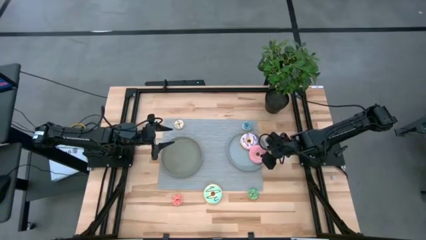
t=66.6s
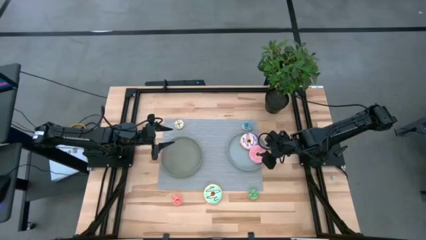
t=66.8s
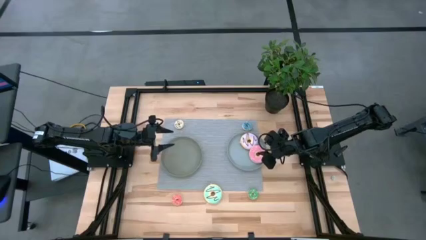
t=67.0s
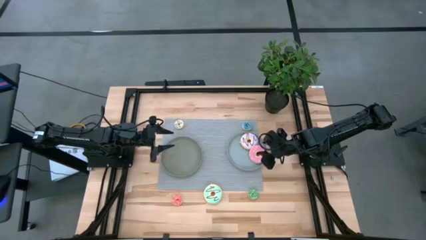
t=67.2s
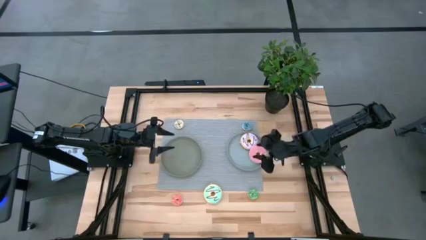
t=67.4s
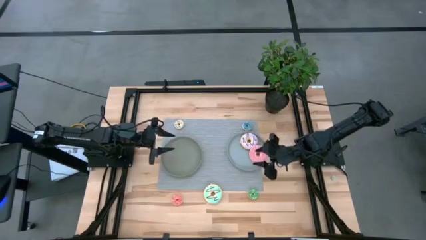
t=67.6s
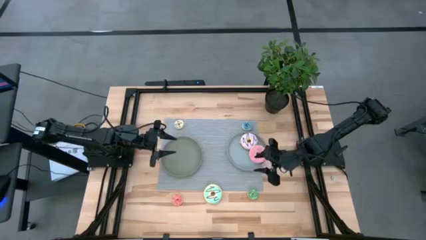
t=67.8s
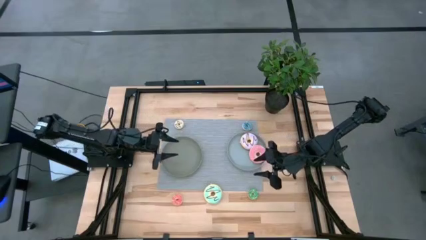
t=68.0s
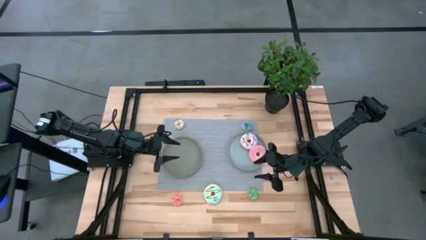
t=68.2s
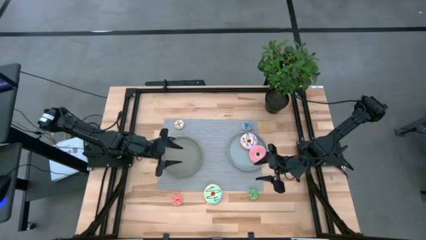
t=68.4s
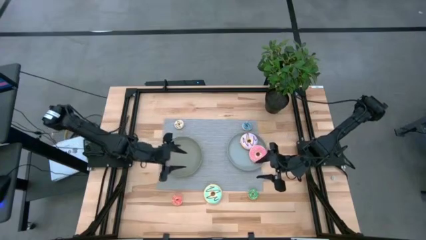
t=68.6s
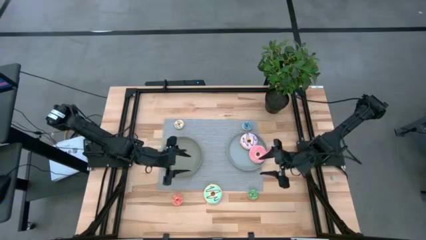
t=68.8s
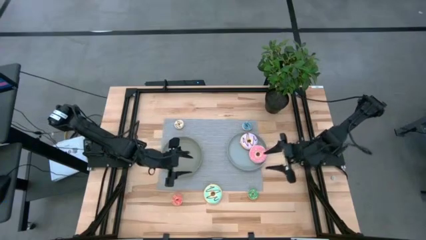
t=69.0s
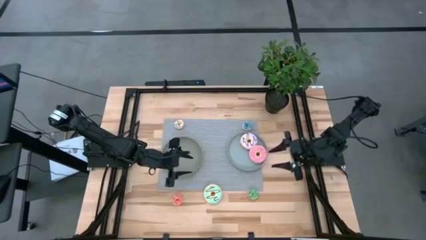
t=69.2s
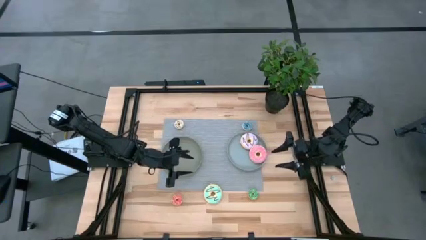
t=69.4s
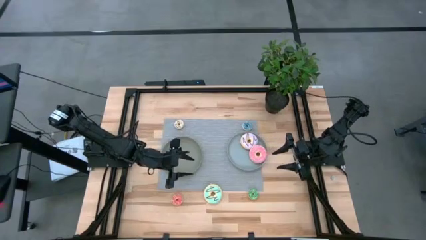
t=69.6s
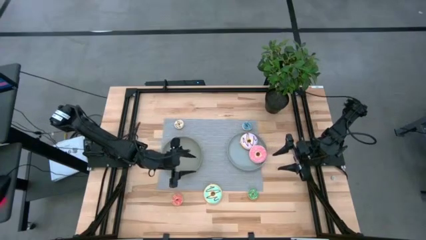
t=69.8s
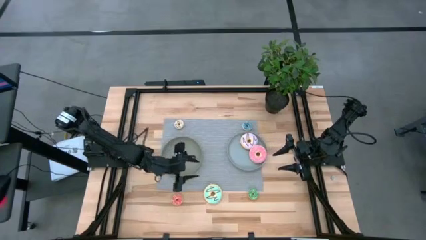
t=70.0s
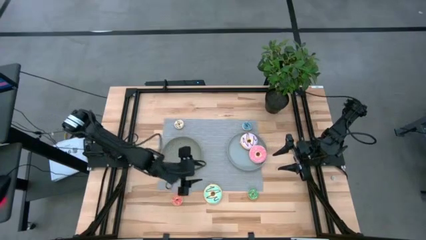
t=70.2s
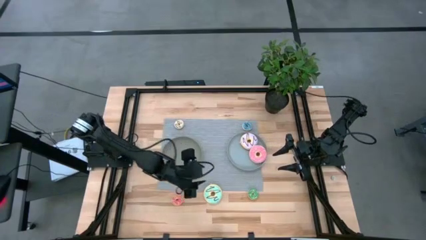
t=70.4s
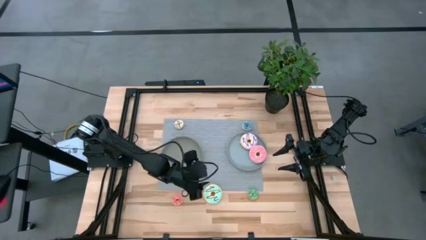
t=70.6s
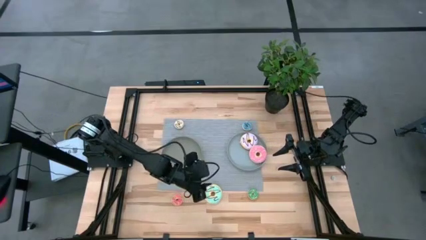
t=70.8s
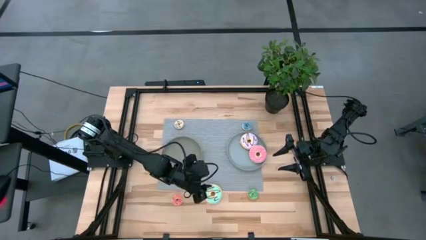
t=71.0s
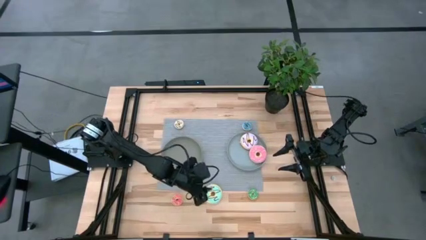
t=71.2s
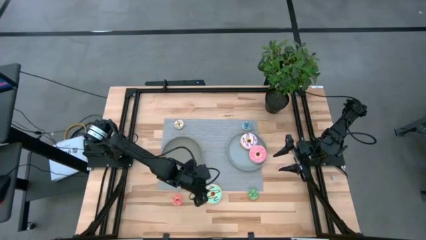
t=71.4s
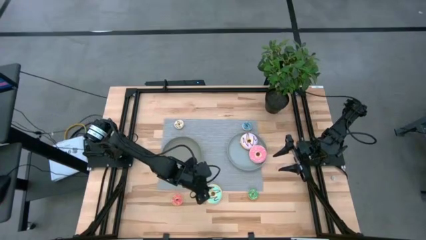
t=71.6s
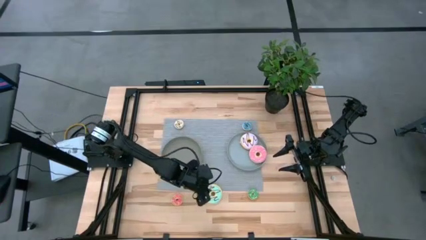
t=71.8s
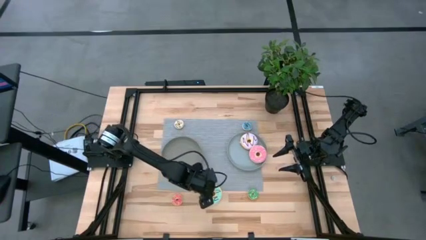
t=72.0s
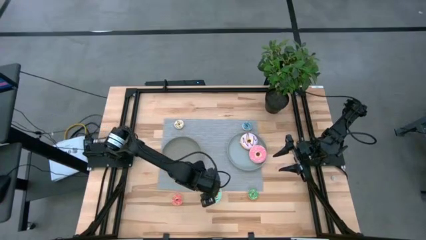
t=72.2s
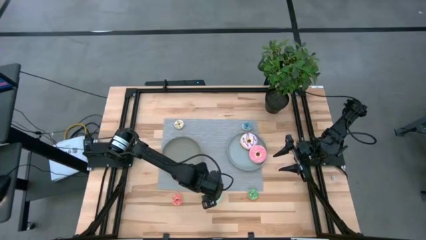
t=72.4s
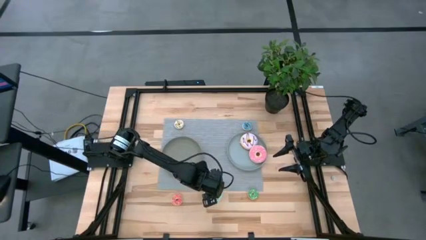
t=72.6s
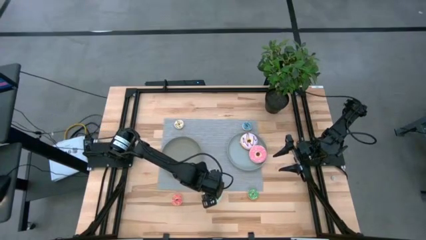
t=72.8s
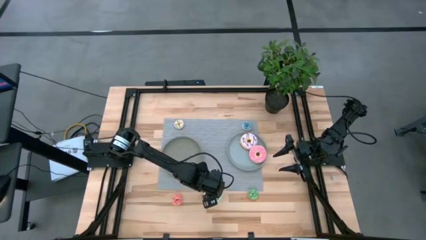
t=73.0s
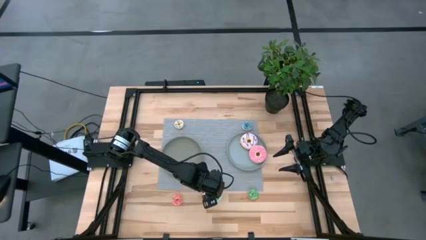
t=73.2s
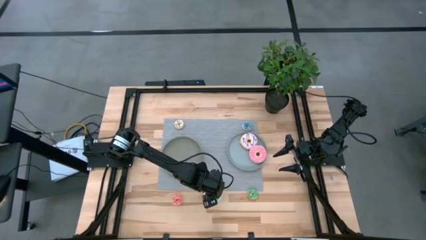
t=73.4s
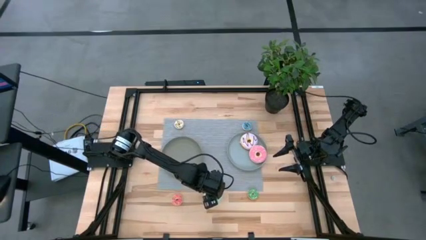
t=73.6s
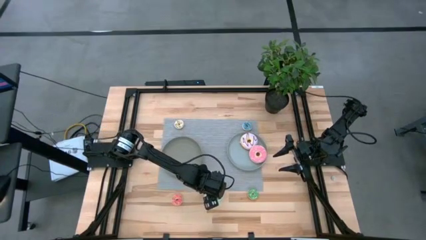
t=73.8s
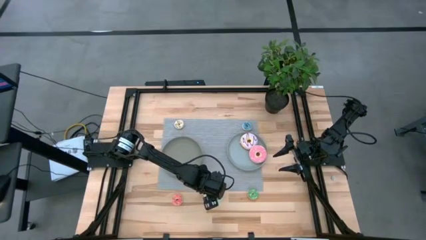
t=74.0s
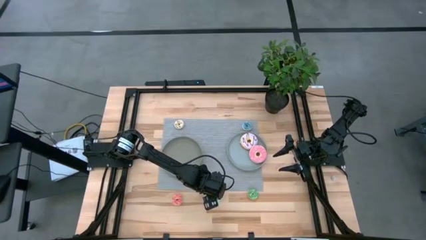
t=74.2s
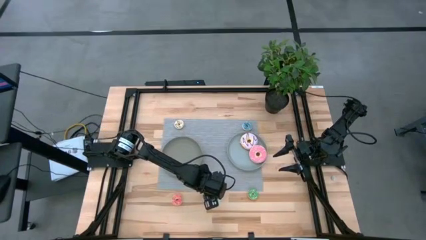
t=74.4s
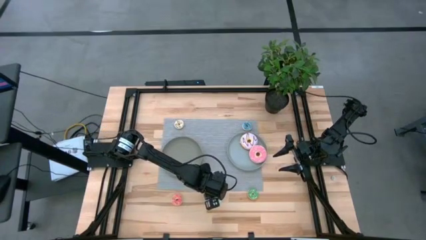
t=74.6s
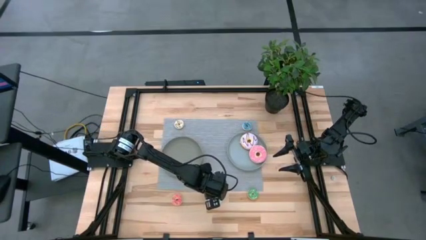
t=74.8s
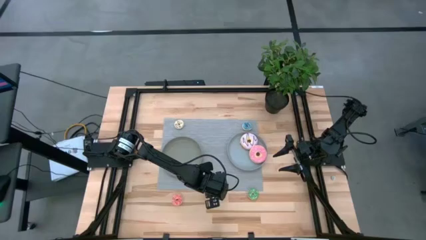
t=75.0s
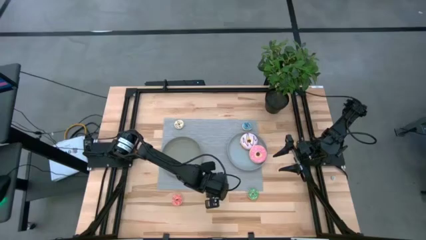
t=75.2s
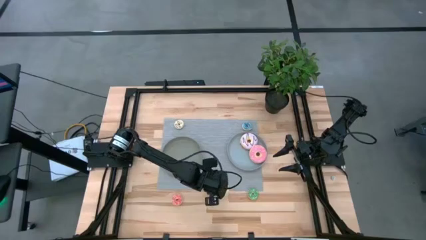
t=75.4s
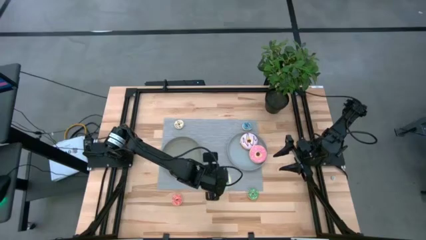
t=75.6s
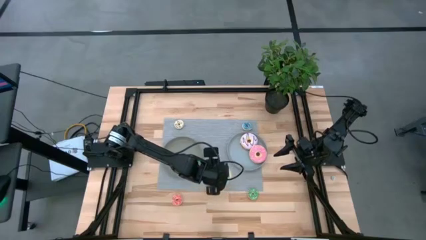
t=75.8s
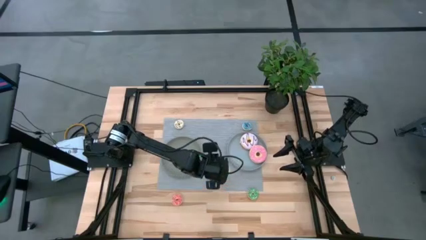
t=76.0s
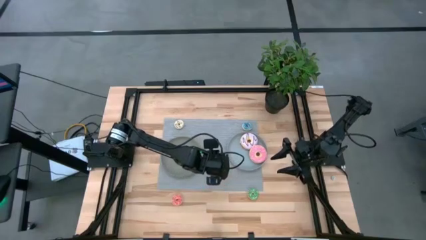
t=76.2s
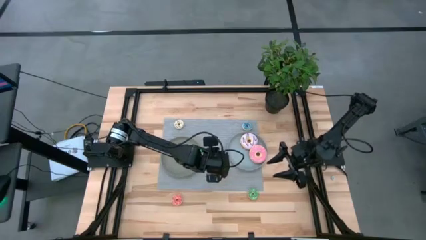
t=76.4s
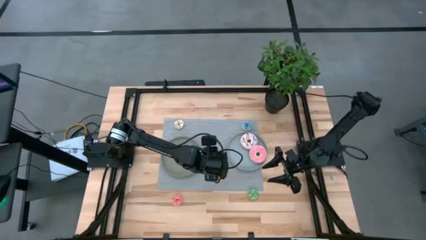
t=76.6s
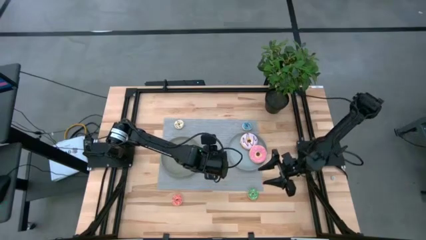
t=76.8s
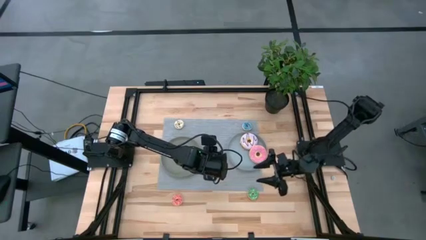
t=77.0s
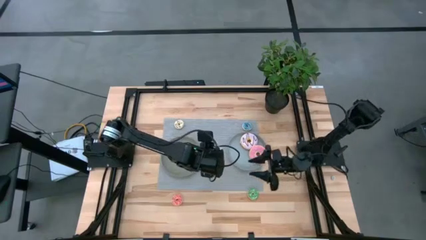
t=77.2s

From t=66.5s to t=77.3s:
Task: Pick & Place donuts
Put the big light blue donut into the blue plate

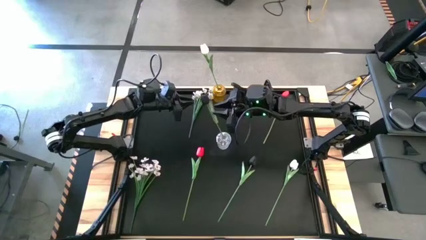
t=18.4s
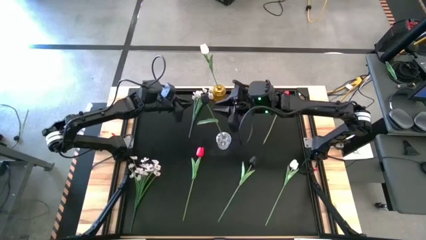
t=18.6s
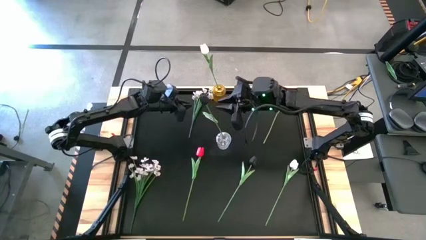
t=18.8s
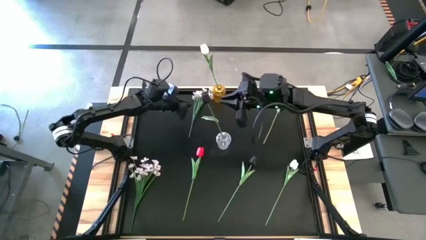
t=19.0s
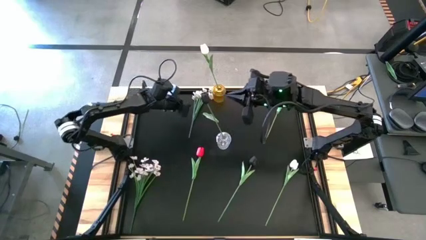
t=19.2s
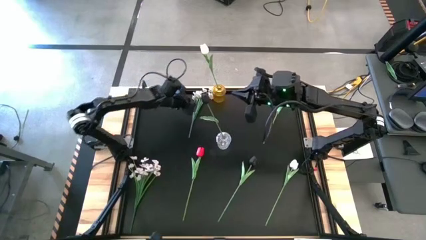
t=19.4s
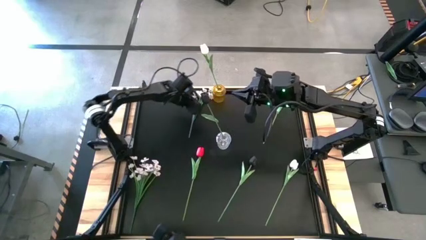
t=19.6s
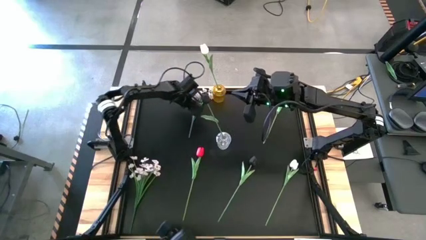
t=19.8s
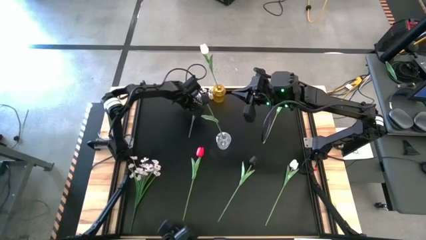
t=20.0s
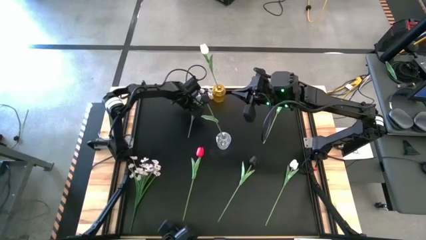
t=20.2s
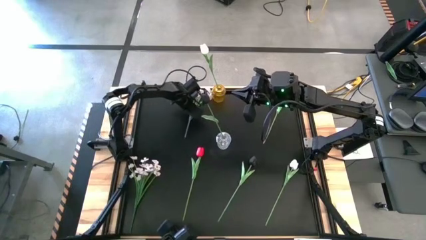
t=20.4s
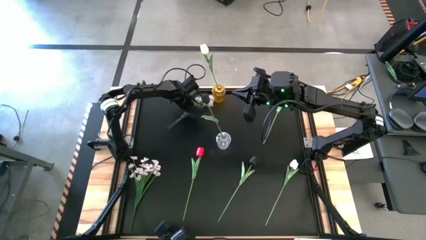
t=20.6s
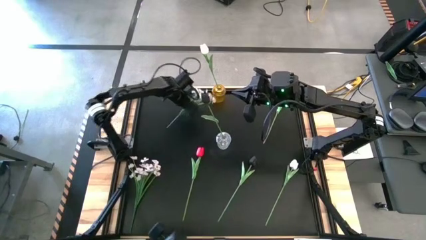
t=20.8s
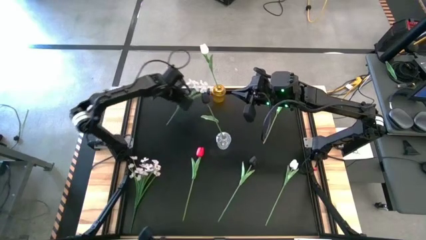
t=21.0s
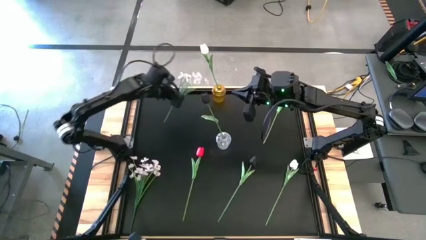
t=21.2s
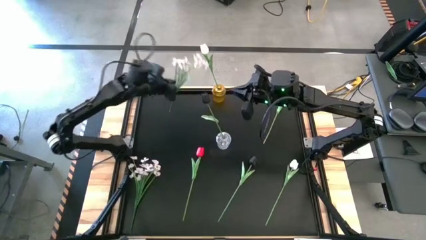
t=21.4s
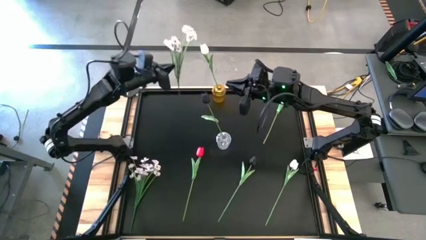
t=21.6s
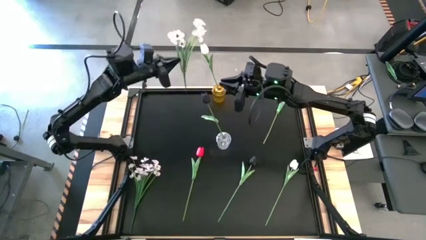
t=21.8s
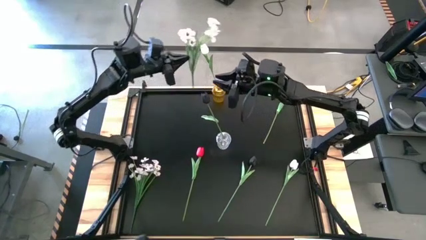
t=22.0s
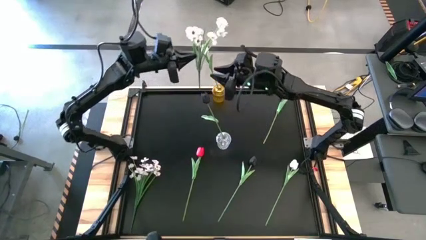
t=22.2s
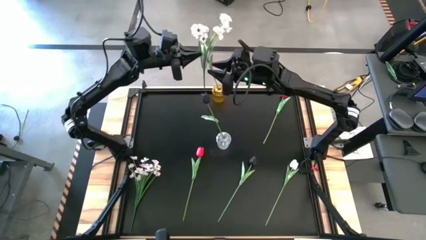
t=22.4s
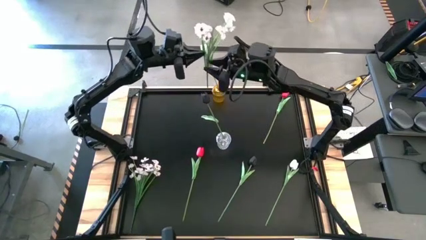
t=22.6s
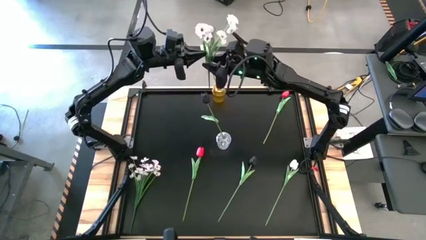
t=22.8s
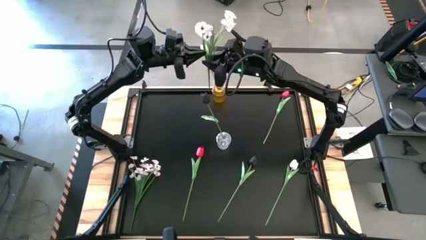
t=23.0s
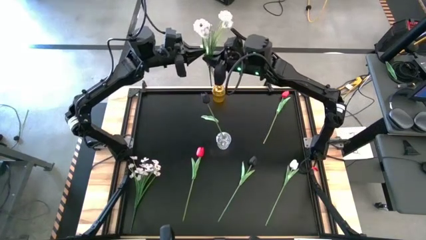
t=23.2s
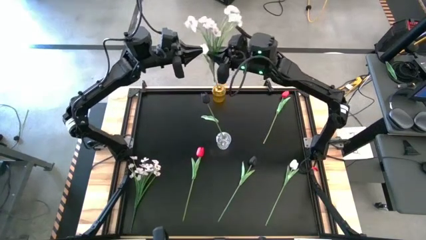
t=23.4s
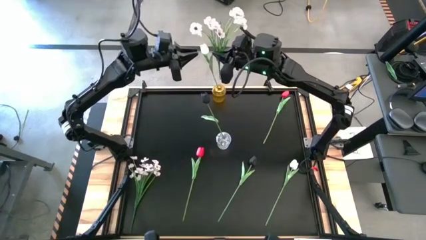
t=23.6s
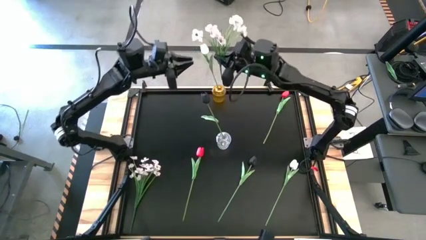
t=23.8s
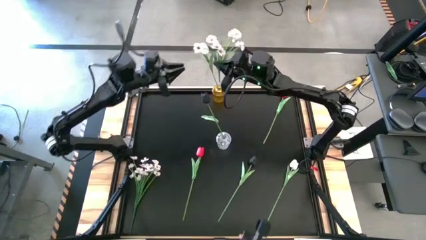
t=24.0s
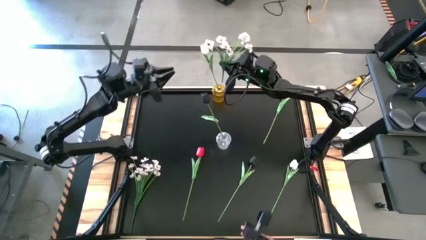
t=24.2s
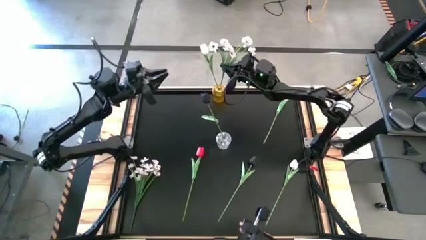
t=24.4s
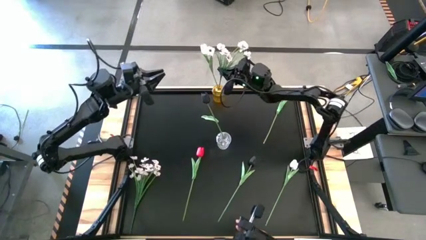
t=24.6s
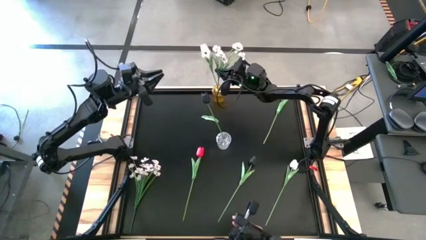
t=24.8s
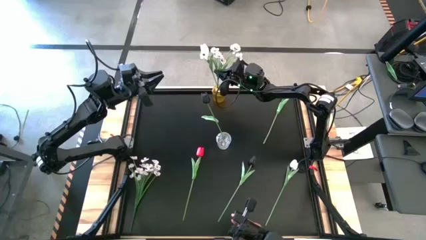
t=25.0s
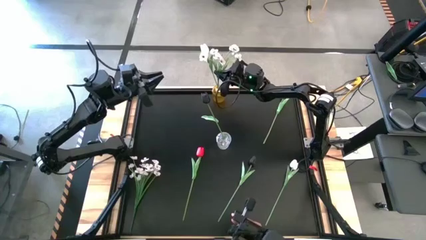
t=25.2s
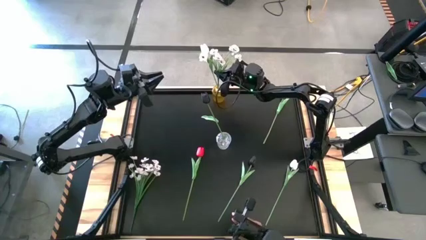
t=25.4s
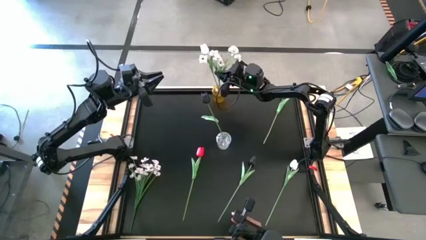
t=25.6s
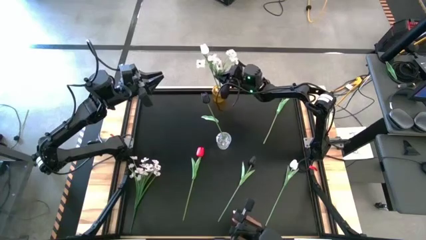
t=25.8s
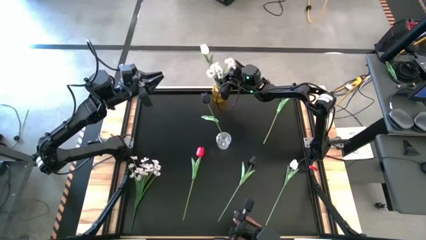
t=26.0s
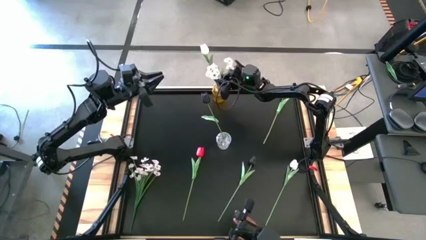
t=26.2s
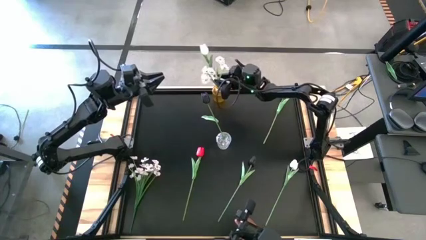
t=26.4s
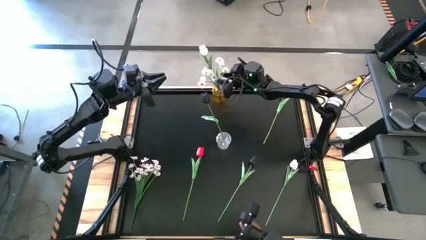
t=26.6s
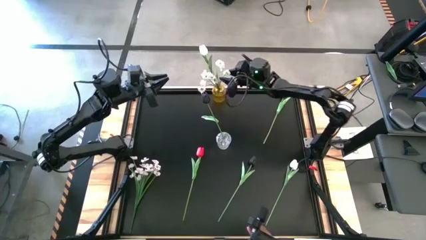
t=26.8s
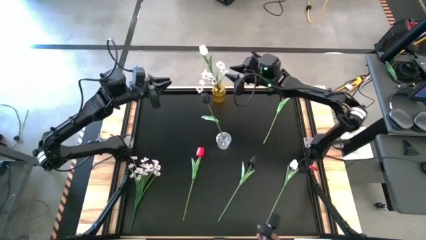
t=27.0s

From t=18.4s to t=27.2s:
Task: Sort flowers into vase by color
Put the top white flowers into the yellow vase
